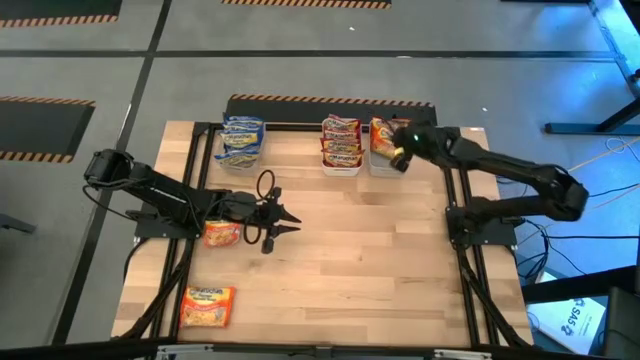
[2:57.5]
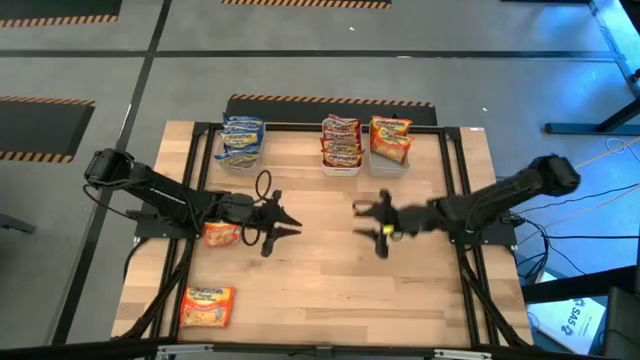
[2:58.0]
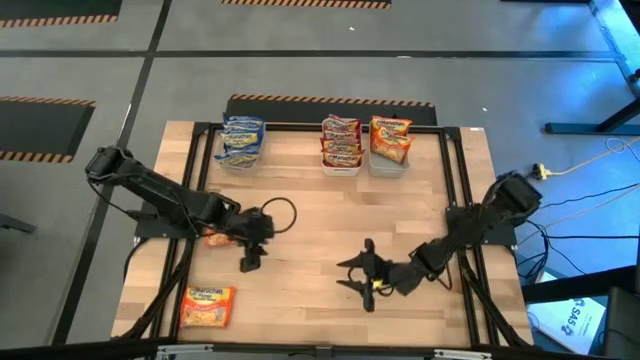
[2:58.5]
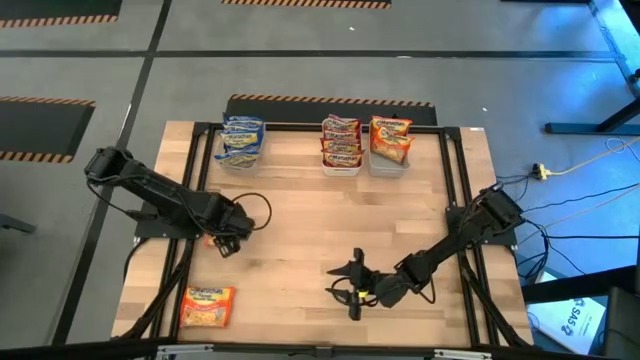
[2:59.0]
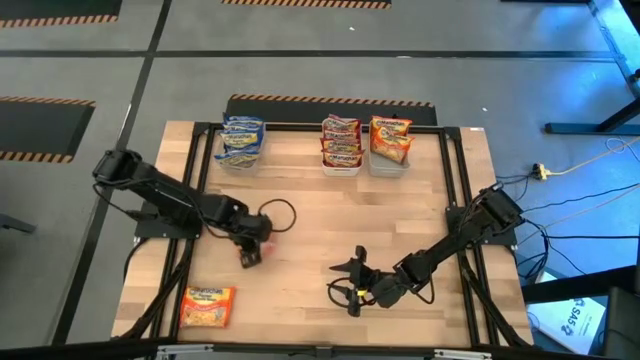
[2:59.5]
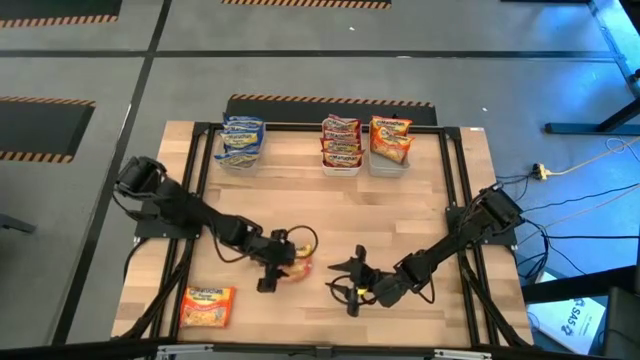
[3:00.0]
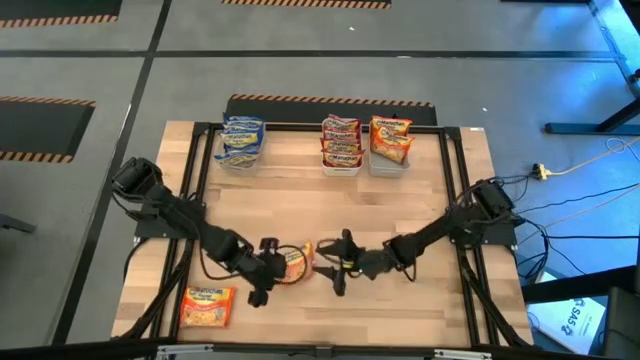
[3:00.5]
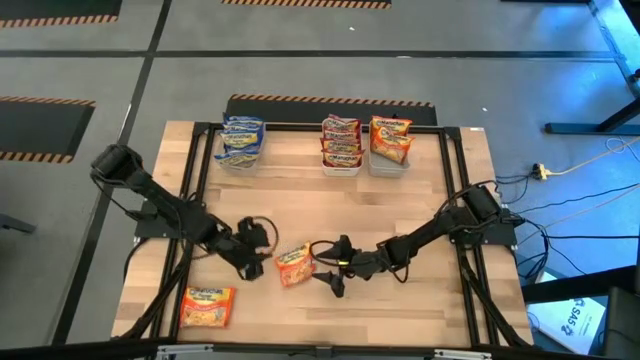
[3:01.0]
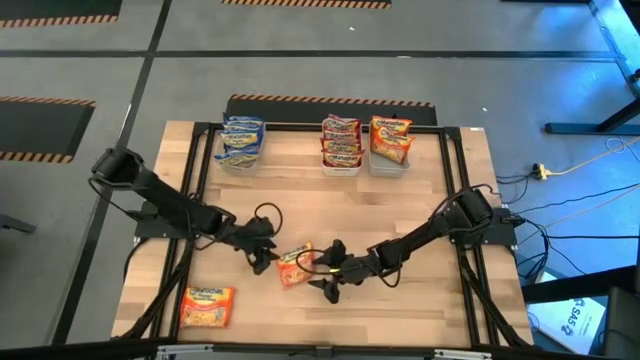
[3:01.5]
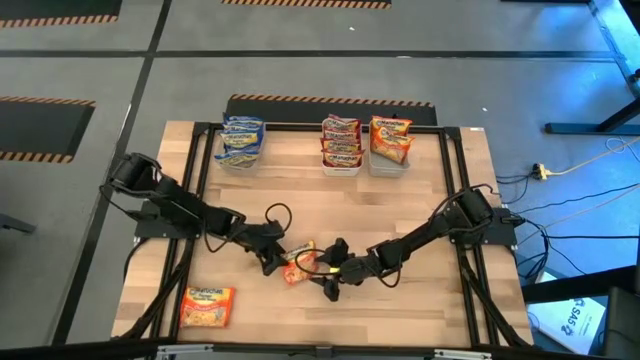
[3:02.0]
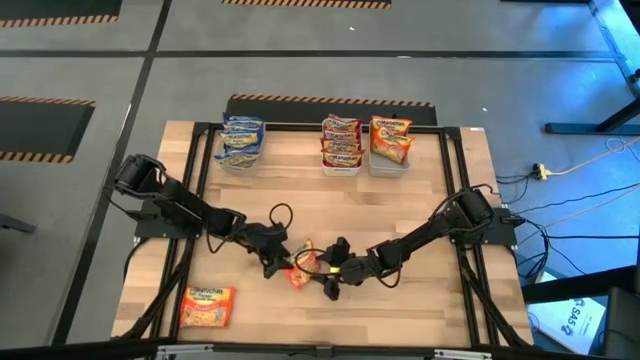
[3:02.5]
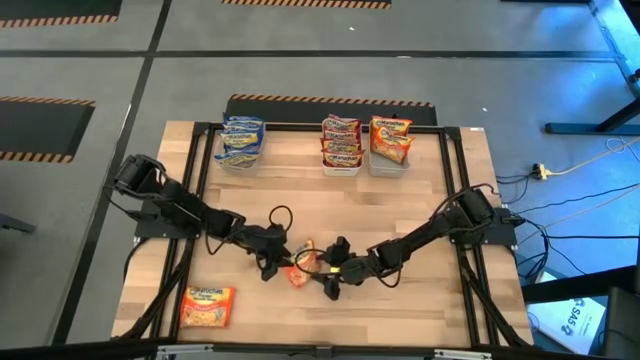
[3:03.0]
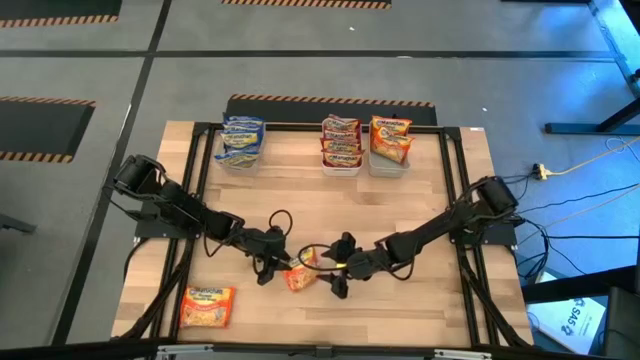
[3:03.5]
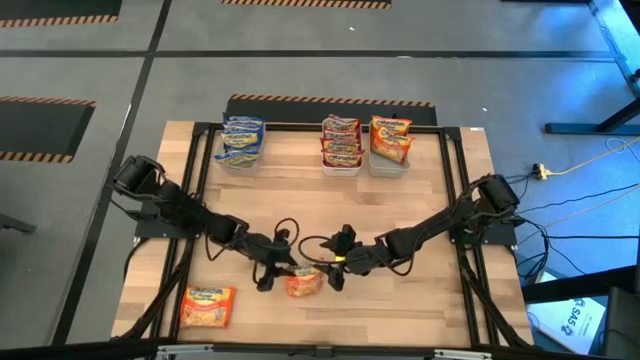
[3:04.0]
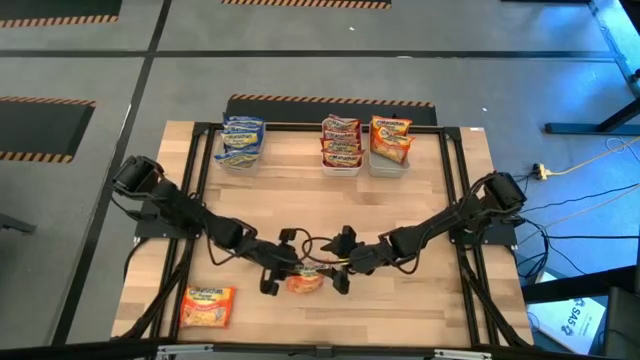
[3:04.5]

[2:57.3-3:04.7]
Task: Sort Maruchan noodles
Put the orange noodle pack into the gray bin

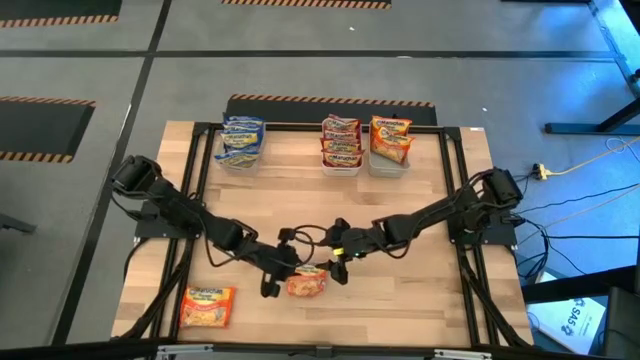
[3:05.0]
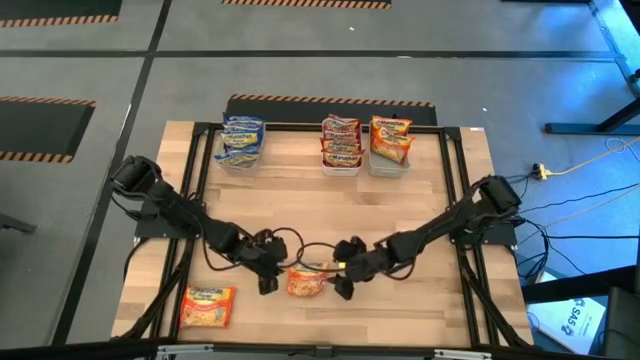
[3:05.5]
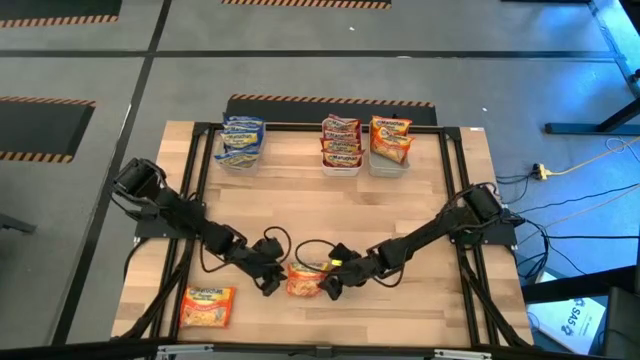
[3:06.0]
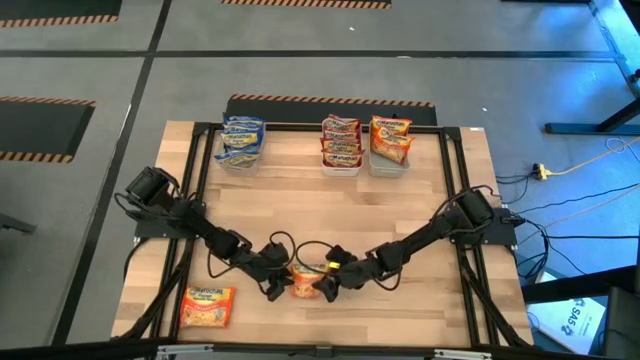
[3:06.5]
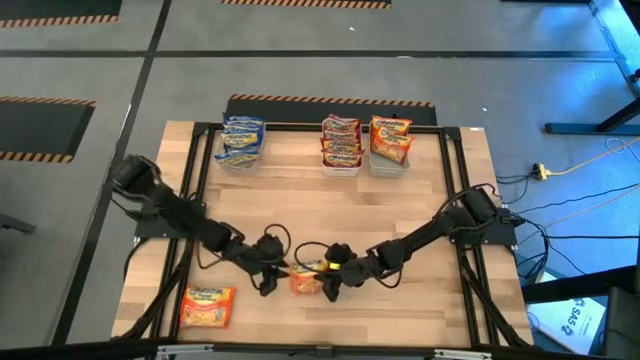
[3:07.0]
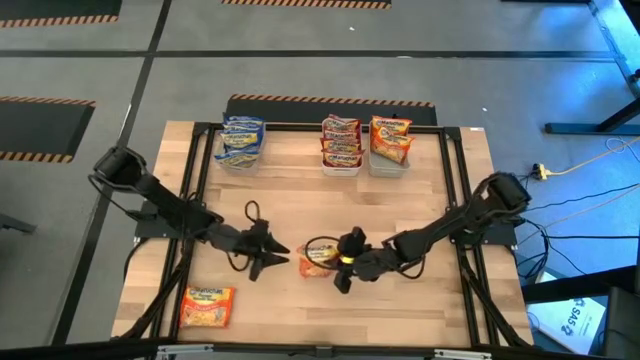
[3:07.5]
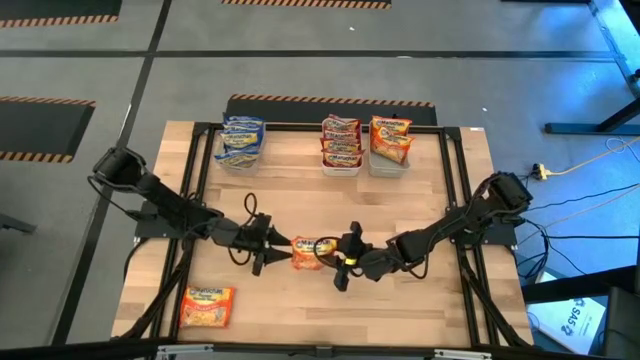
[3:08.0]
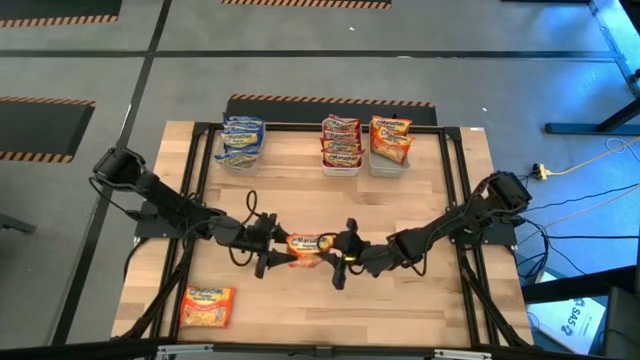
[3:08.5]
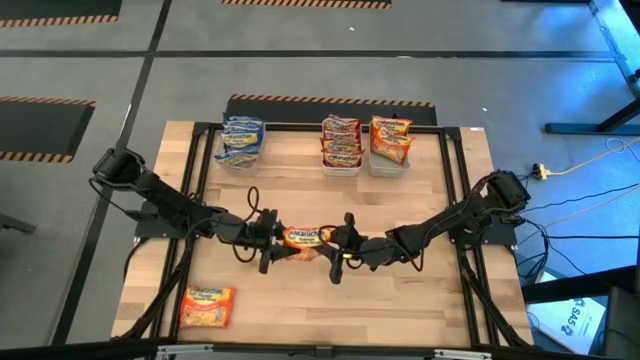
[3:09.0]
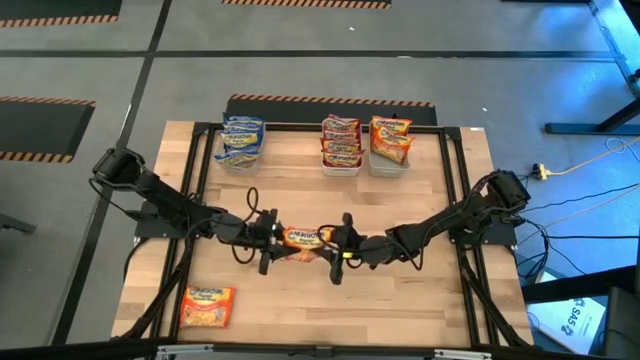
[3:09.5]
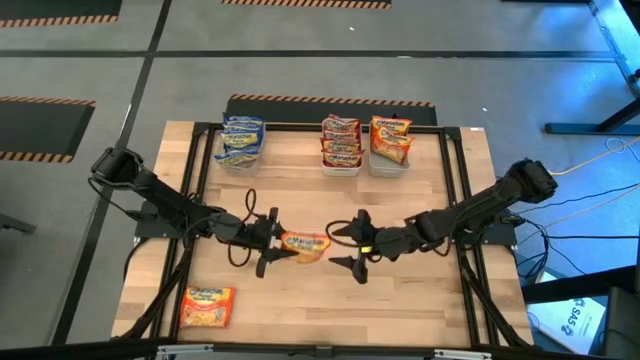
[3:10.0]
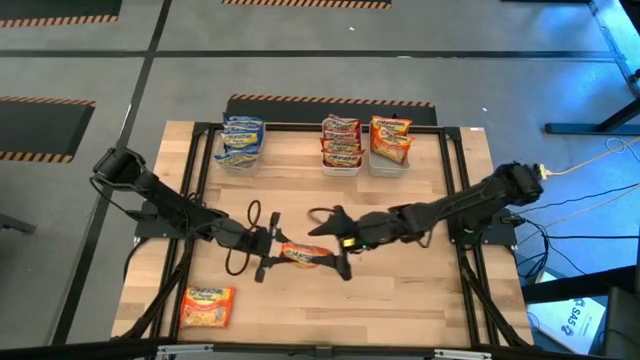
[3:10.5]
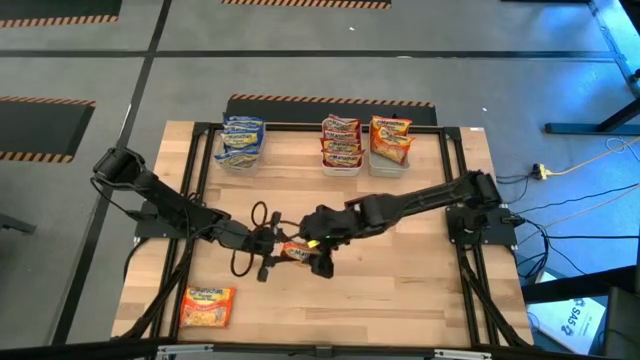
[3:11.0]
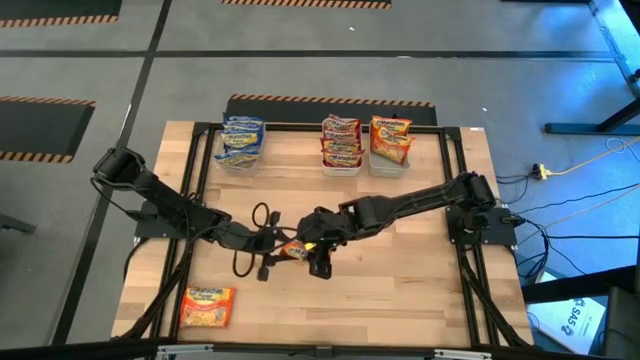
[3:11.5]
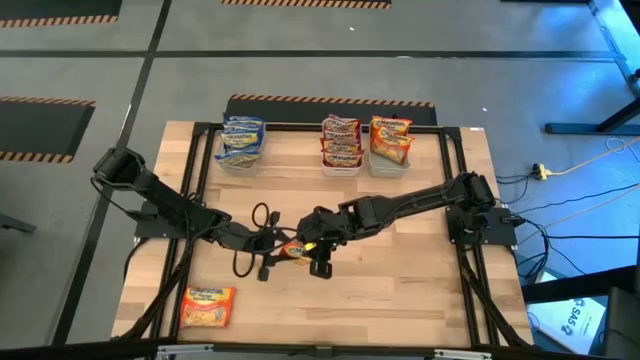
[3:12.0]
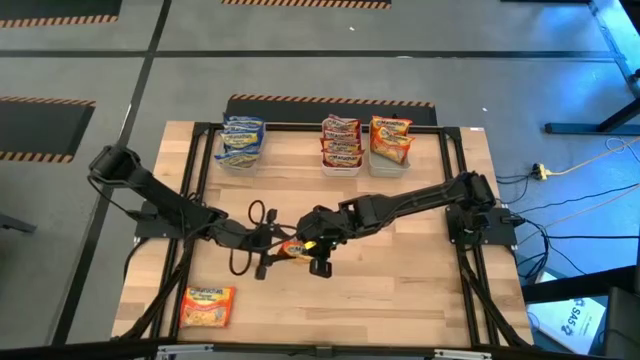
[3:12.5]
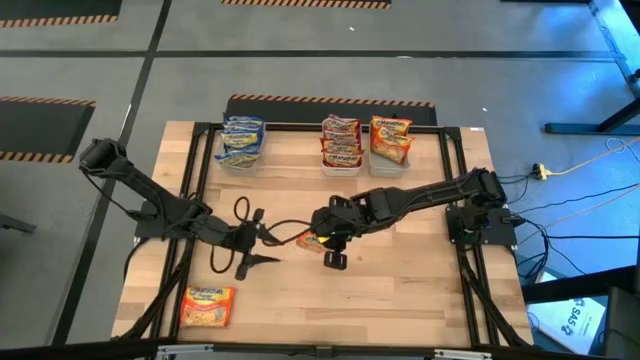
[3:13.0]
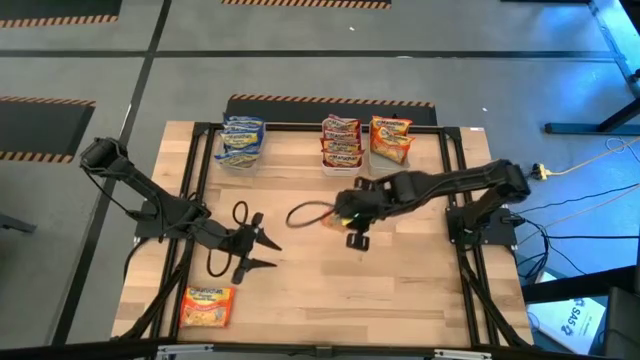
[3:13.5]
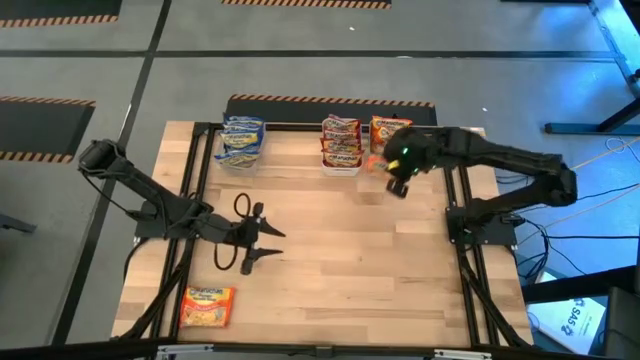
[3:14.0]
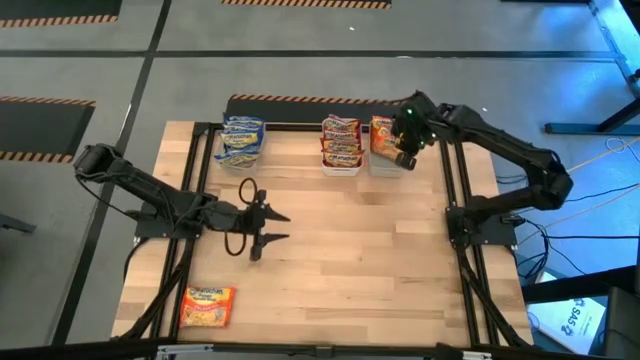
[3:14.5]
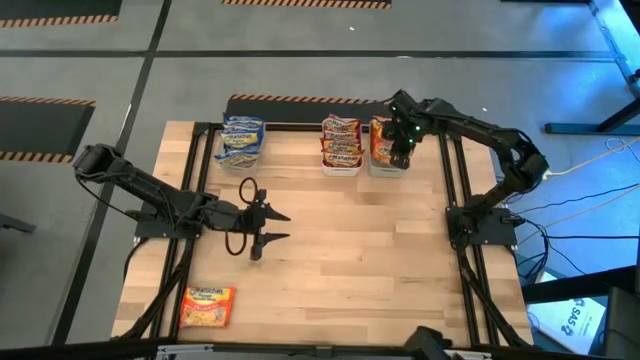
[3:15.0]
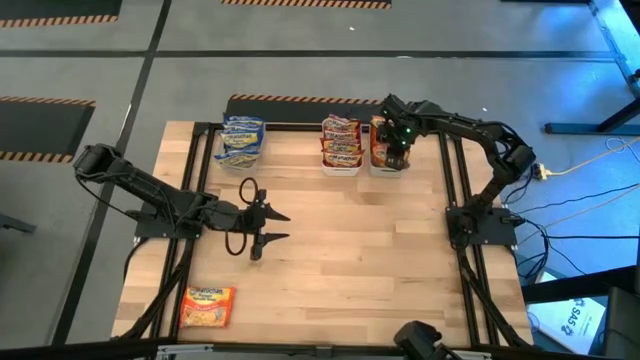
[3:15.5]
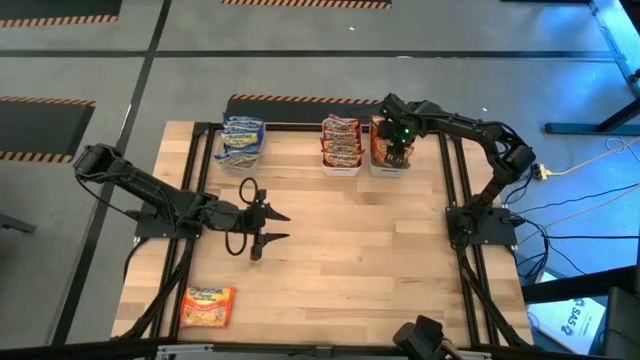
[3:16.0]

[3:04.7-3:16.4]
Put the orange noodle pack into the gray bin

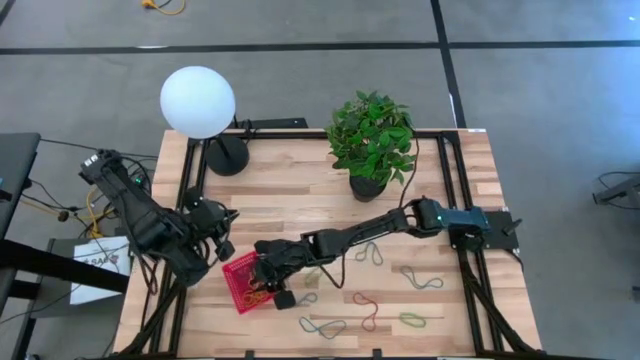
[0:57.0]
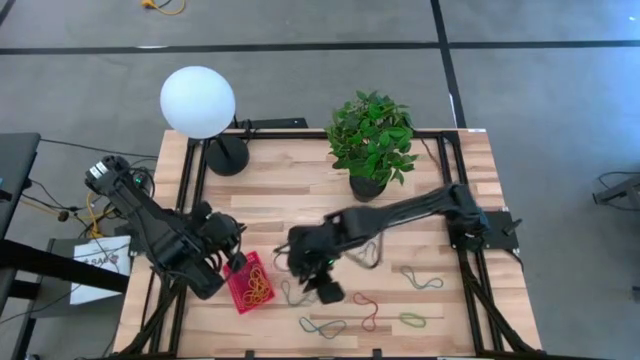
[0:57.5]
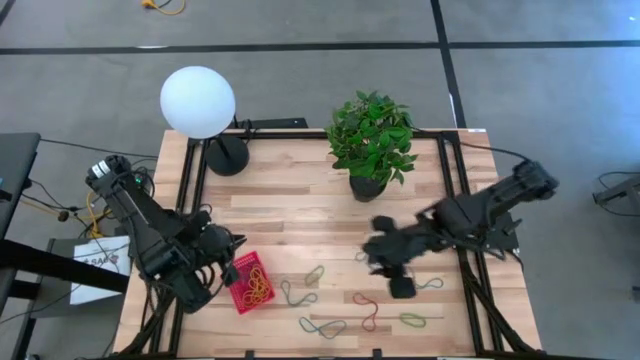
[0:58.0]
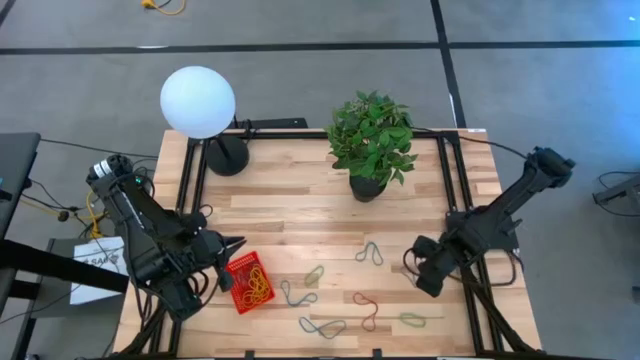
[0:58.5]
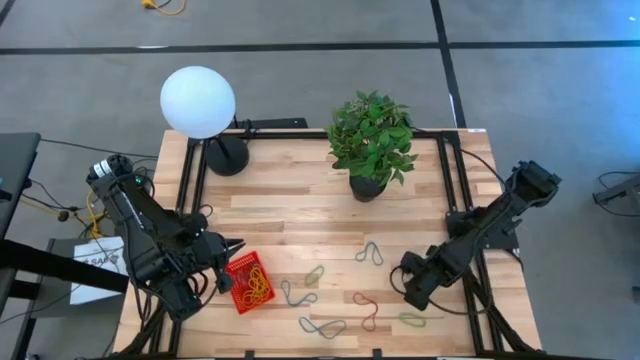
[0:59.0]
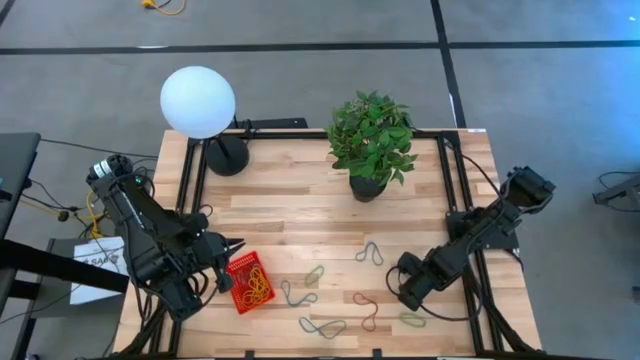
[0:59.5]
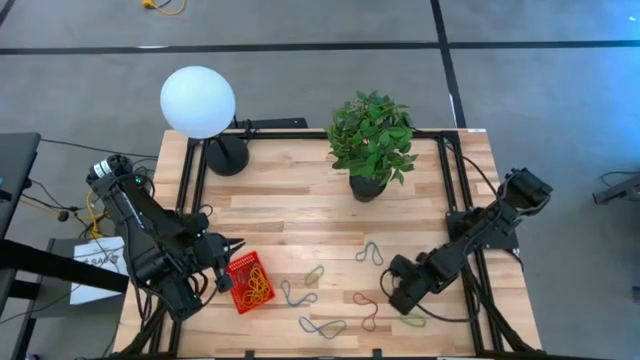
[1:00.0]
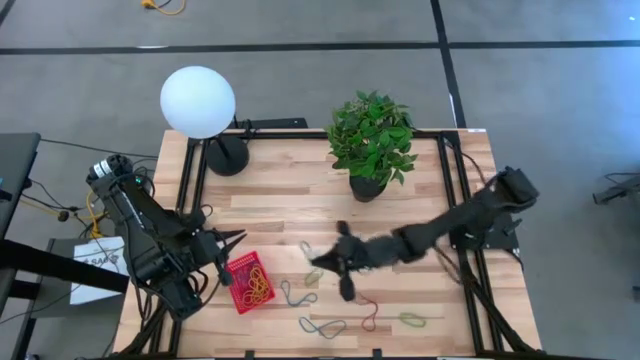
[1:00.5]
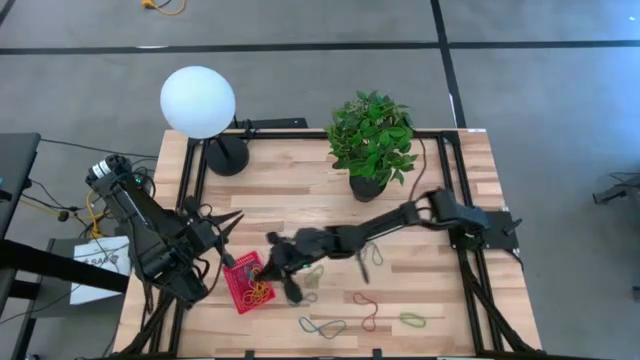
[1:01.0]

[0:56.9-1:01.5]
Task: Pick and place items into bin
Put the blue rubber band into the red bin
